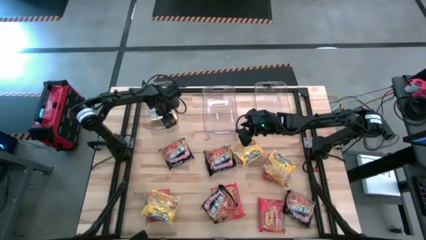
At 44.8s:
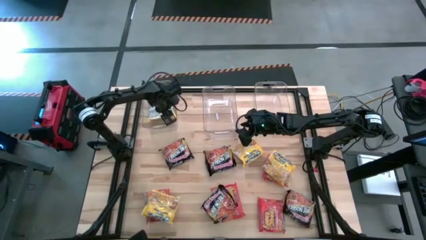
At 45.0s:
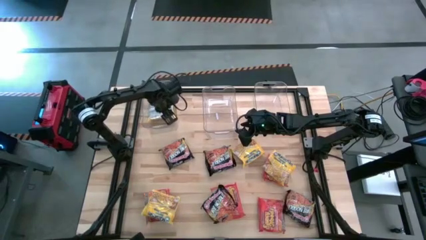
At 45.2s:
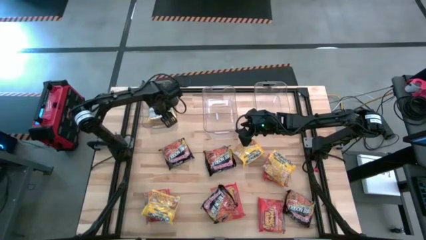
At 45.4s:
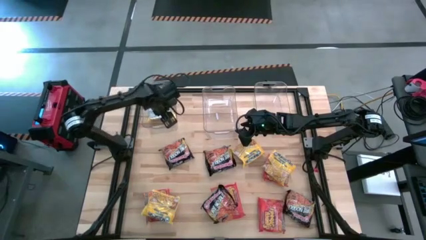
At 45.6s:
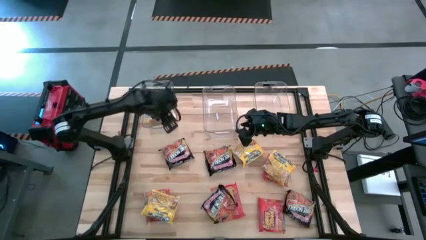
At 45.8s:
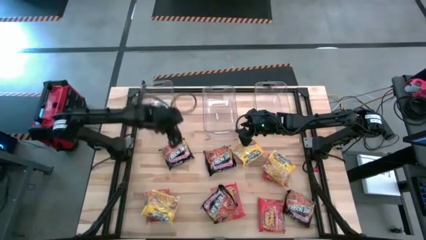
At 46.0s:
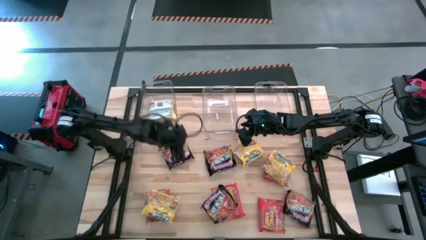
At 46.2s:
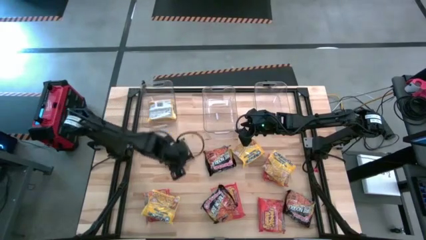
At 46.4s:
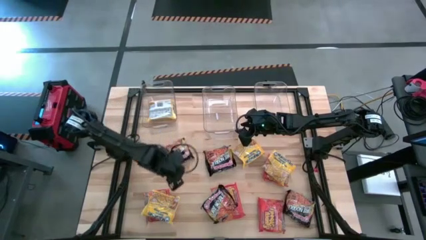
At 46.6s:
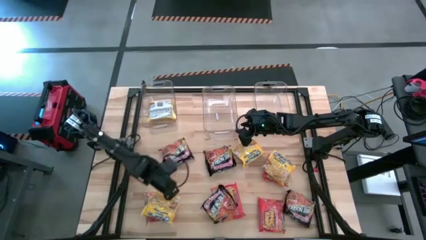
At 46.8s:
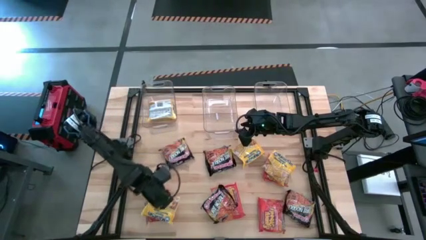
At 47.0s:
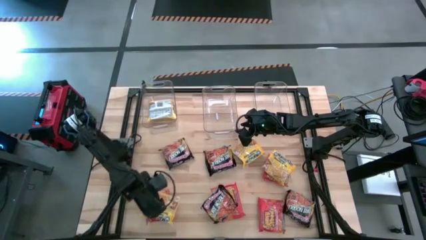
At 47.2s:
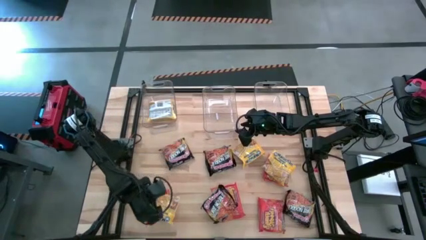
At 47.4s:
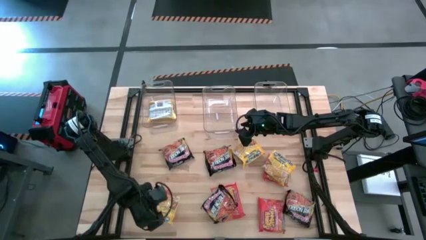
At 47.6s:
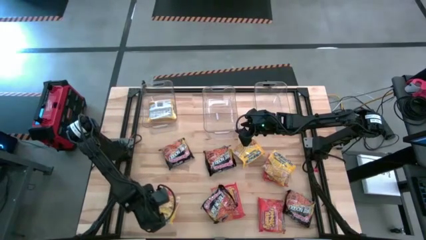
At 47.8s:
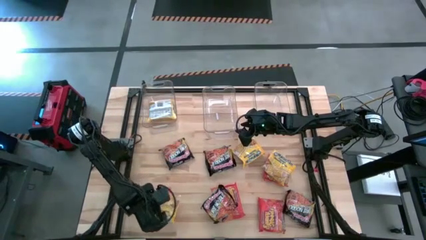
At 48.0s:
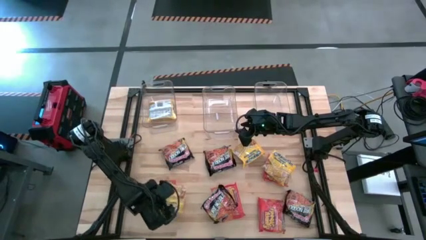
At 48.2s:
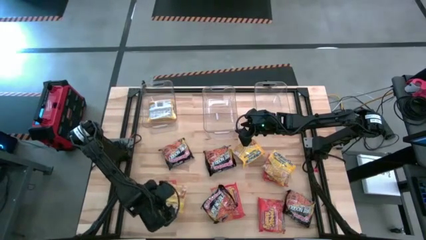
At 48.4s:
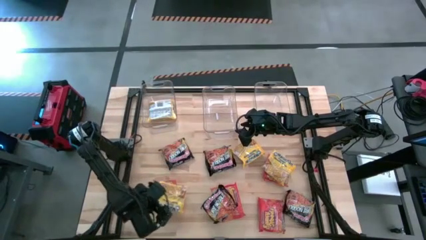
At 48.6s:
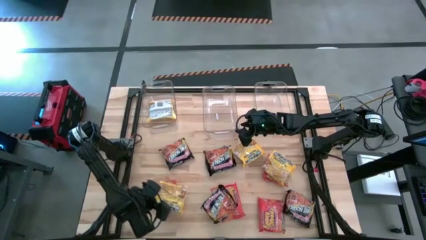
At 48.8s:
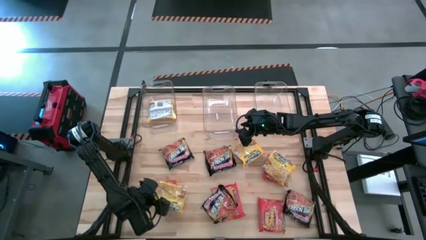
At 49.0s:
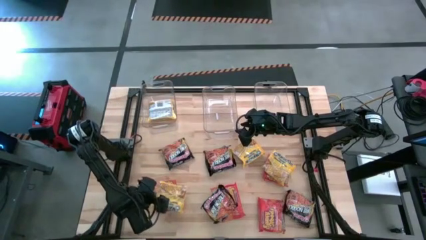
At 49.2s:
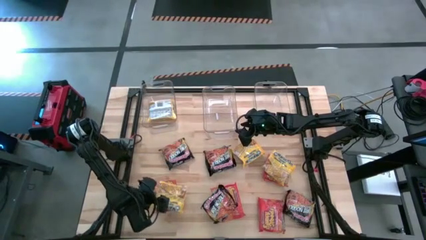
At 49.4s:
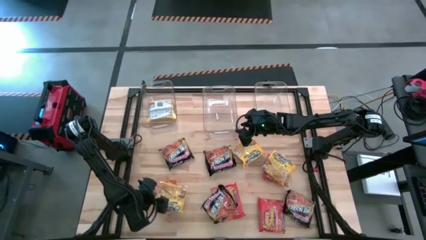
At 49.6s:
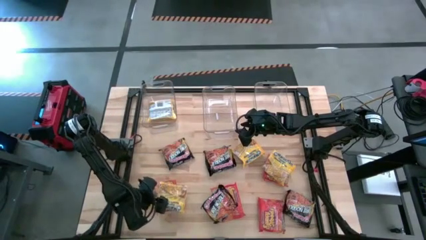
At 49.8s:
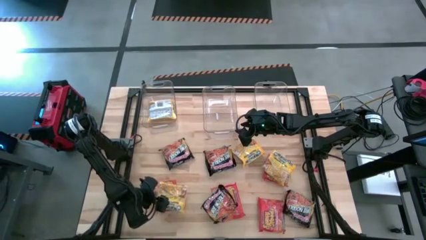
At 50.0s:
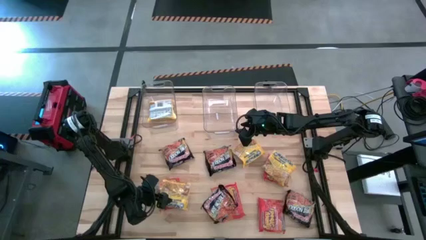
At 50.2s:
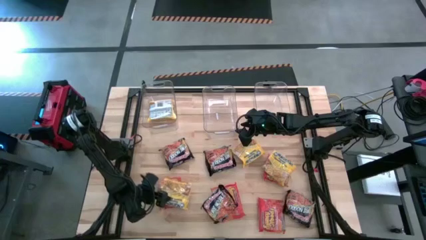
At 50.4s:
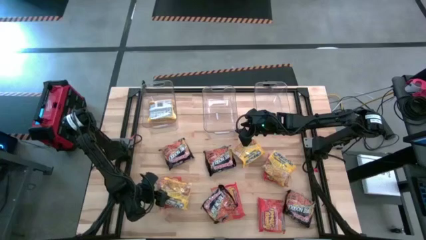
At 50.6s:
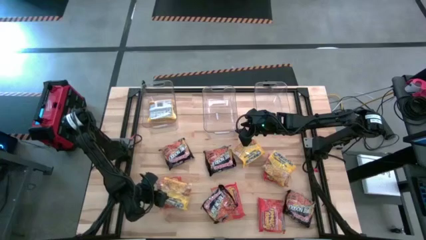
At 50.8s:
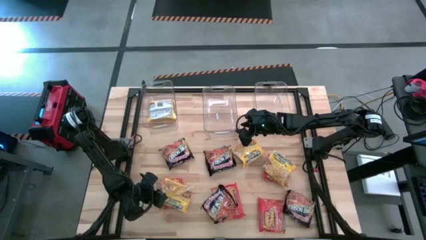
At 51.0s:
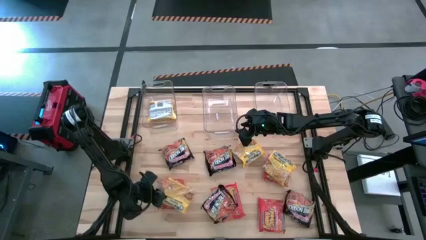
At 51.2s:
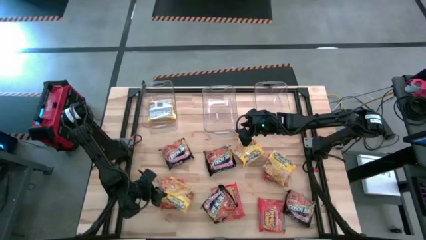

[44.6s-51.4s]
Task: Sort Maruchan noodles
Put the yellow noodle pack into the left transparent bin

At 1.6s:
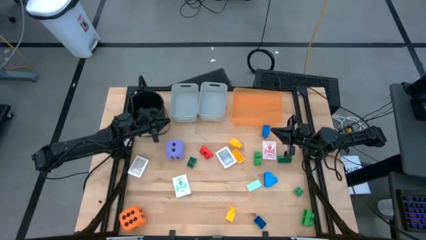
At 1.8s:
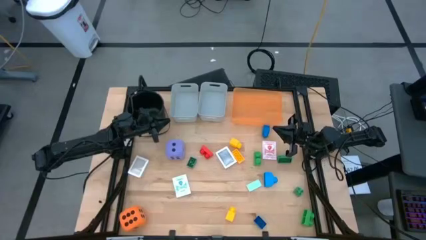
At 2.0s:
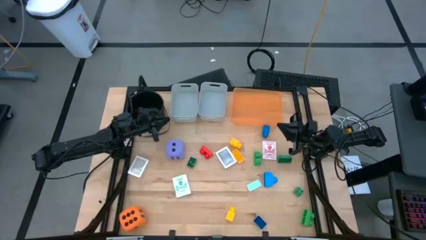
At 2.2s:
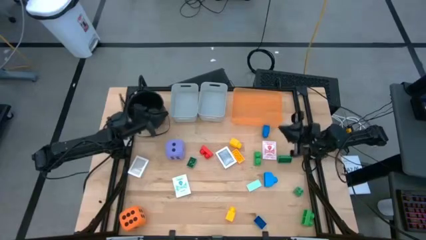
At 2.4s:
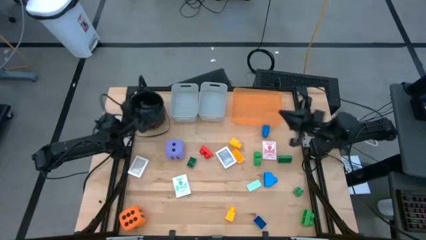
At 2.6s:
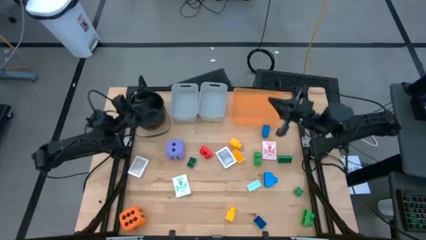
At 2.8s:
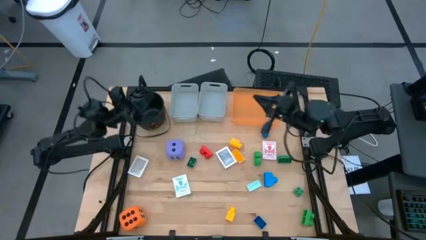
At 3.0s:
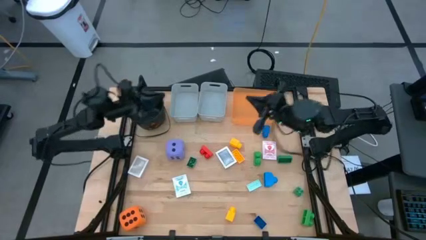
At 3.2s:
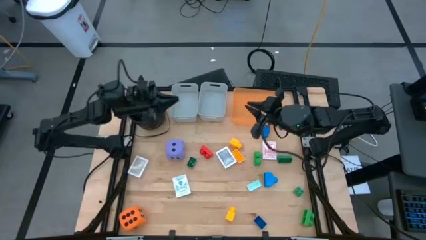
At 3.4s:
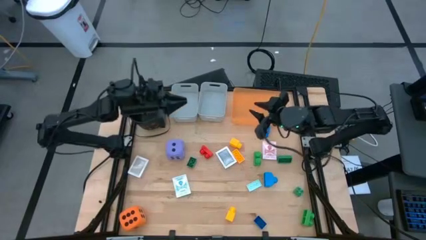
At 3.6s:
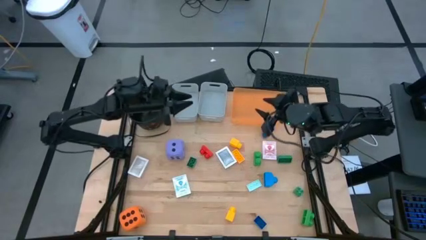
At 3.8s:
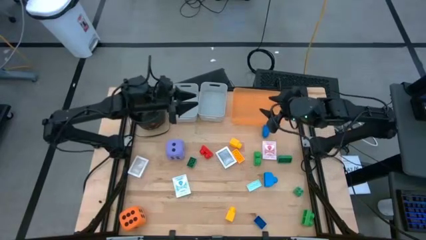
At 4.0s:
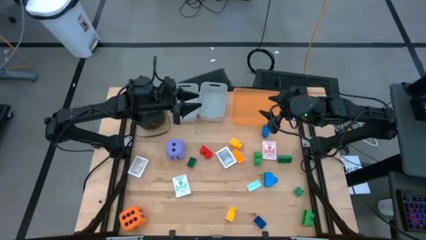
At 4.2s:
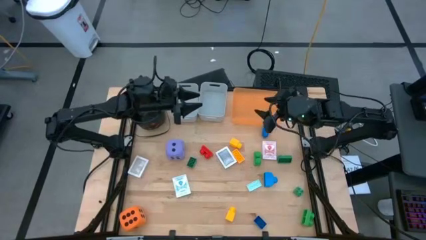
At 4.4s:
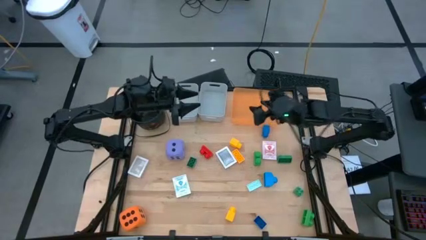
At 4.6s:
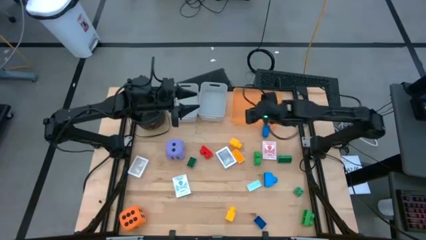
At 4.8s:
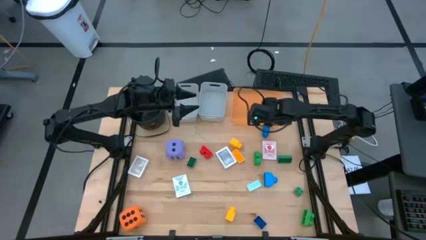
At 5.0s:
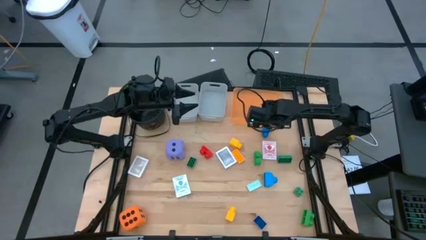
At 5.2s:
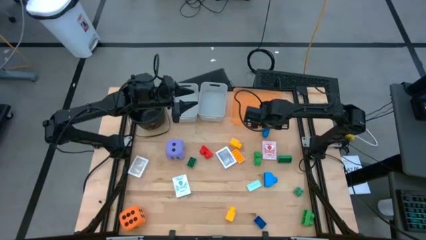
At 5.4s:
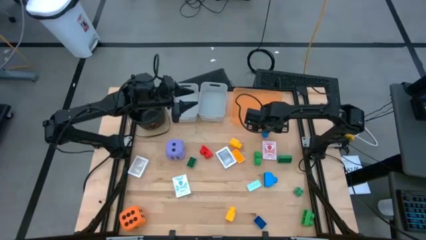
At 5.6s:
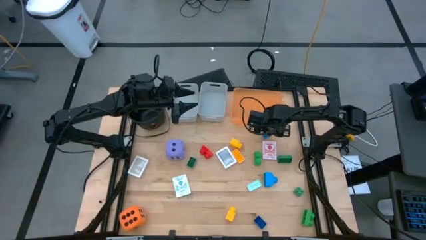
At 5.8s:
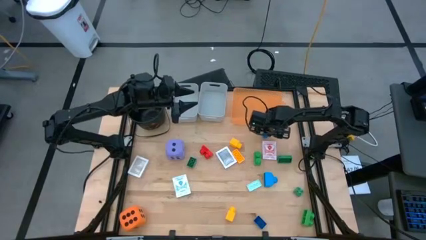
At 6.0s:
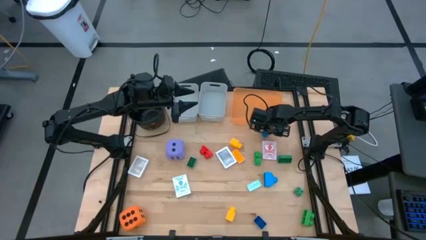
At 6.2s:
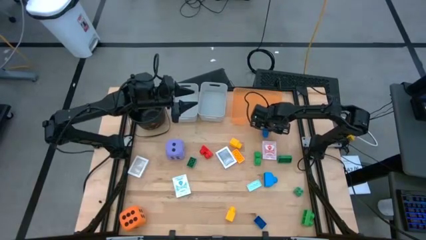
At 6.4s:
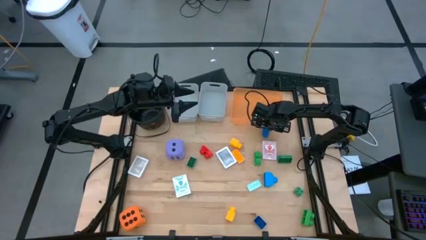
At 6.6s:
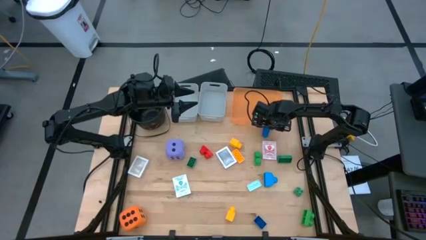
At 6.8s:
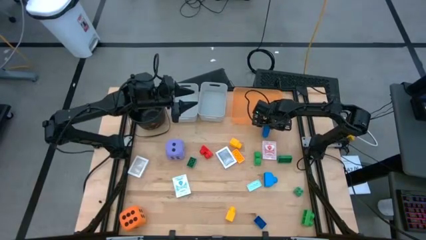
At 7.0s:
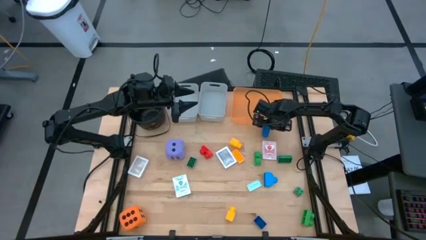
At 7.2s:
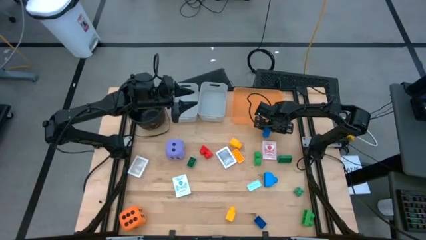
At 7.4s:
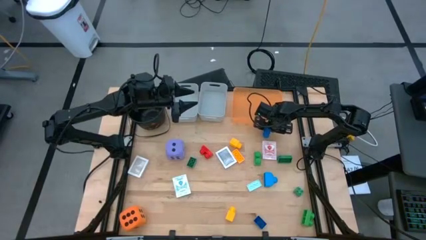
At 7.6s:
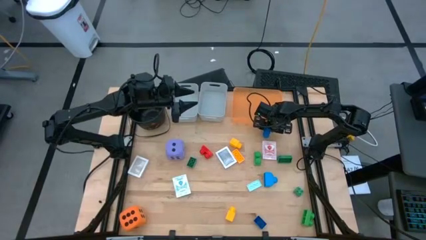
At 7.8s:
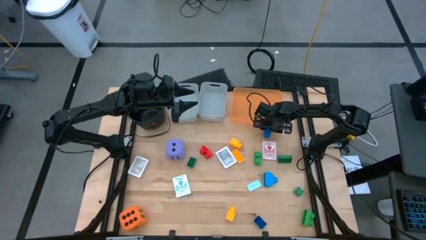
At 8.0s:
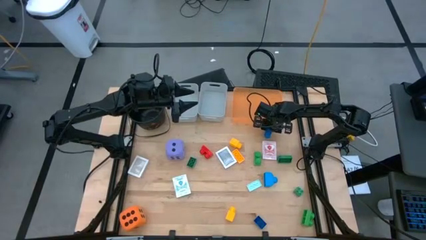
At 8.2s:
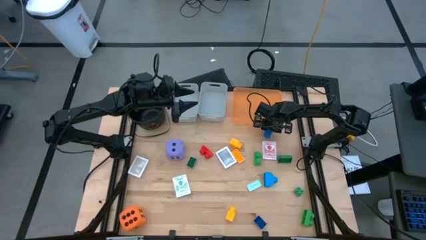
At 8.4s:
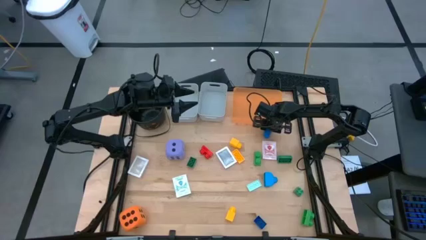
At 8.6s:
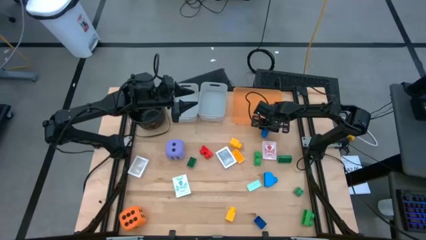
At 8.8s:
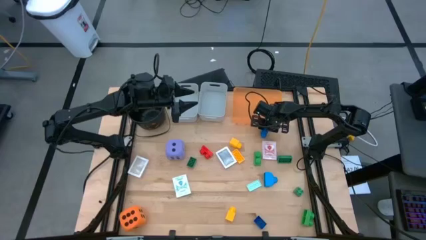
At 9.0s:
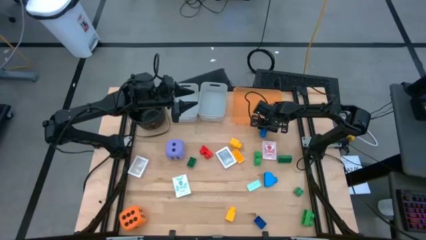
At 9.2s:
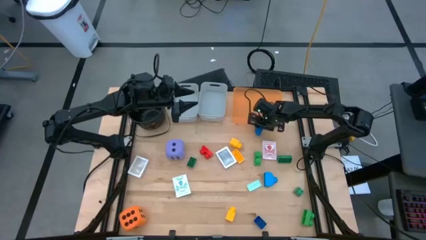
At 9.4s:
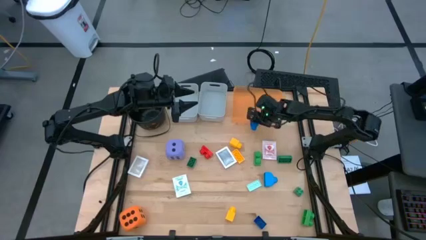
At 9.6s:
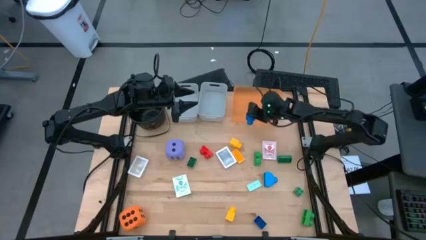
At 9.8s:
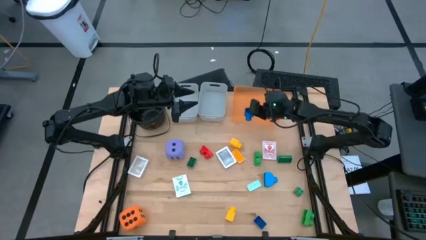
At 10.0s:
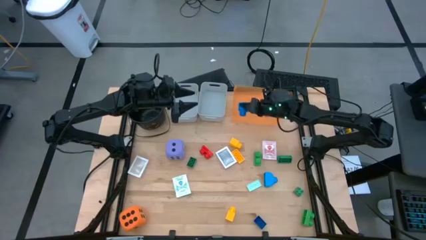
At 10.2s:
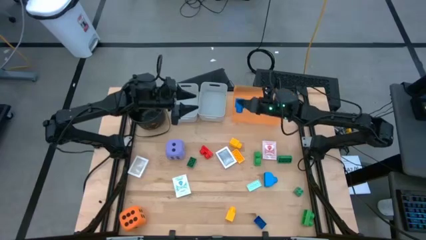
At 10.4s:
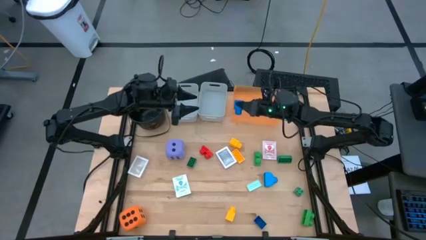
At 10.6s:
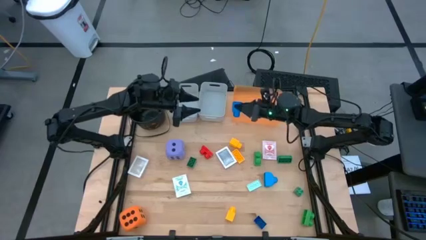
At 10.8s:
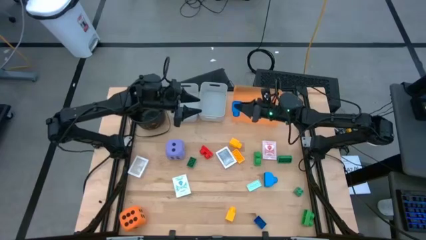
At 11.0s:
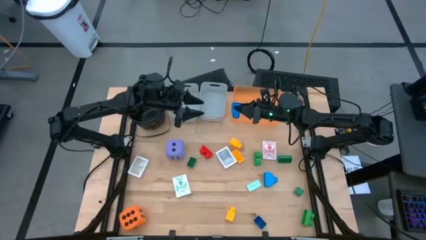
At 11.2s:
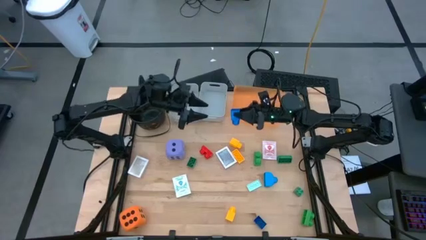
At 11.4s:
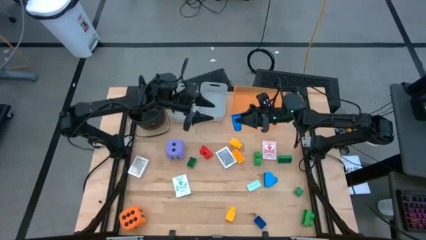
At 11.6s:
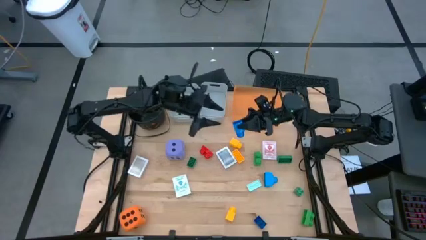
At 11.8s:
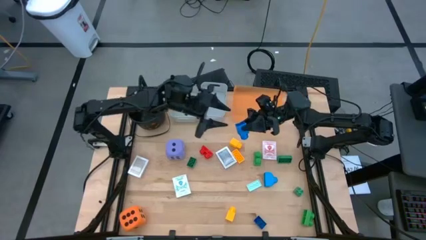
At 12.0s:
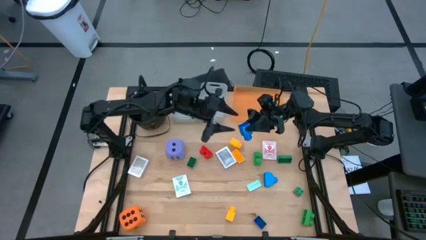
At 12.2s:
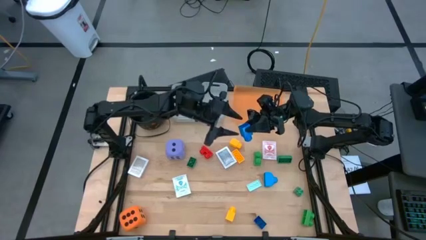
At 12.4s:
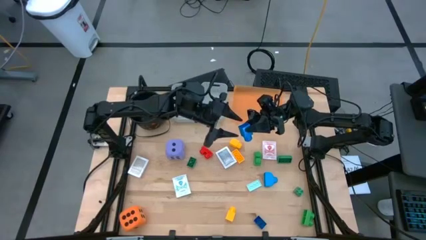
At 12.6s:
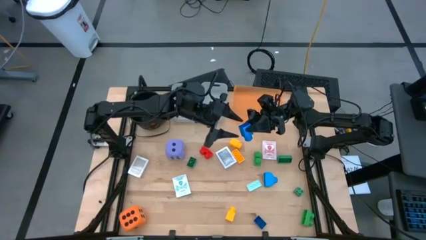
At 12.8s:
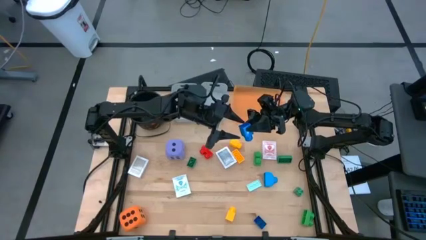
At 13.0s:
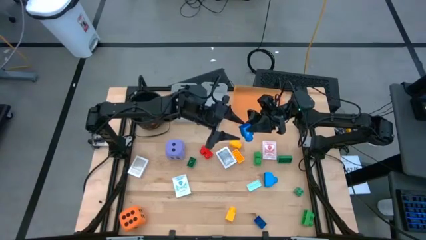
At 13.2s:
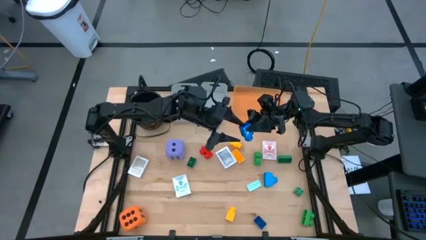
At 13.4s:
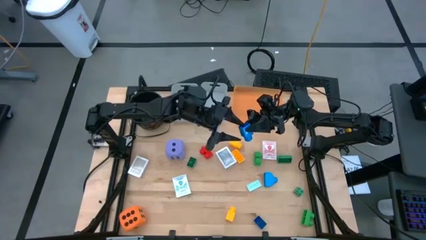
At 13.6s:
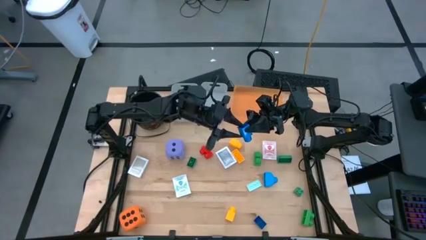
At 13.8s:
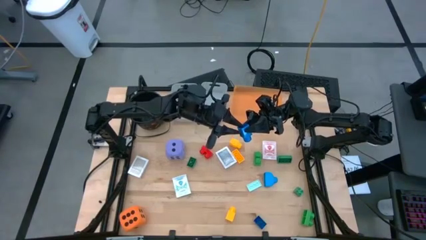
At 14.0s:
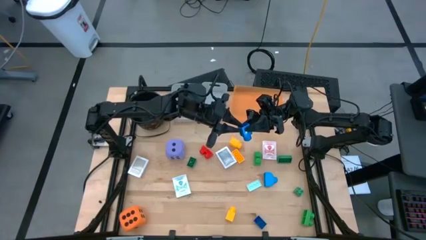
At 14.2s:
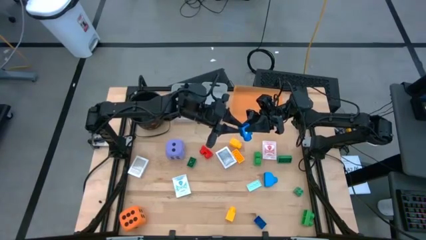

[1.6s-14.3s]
Task: Pick & Place Toys
Put the blue gamepiece into the right gray bin
